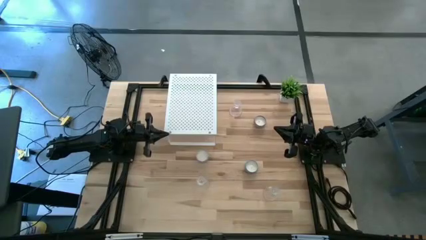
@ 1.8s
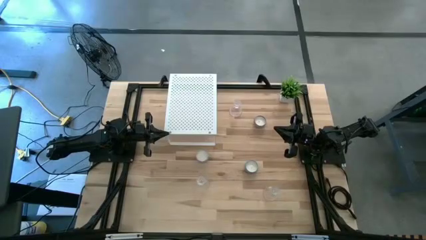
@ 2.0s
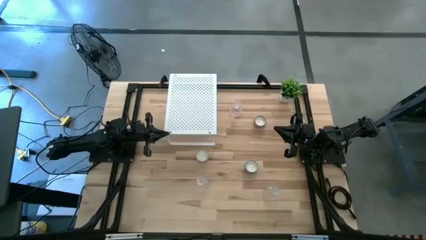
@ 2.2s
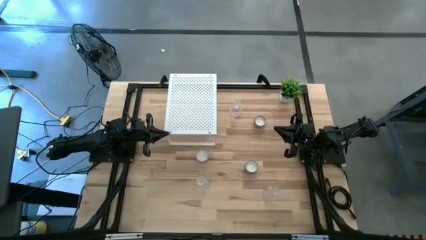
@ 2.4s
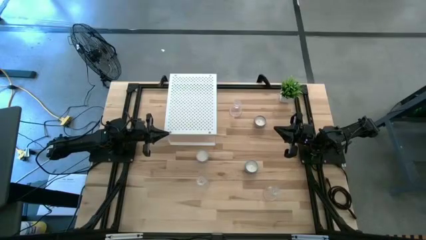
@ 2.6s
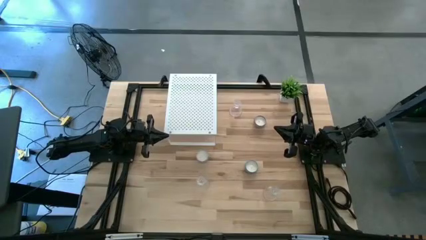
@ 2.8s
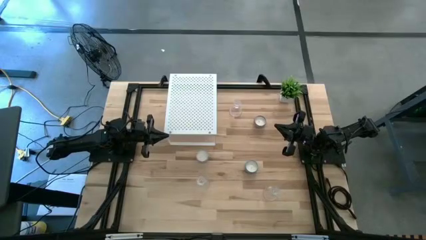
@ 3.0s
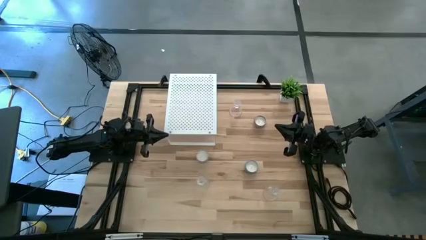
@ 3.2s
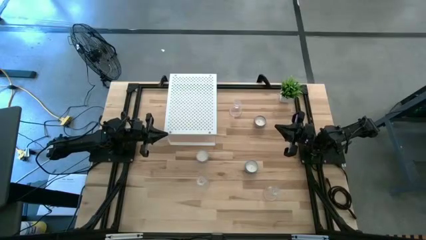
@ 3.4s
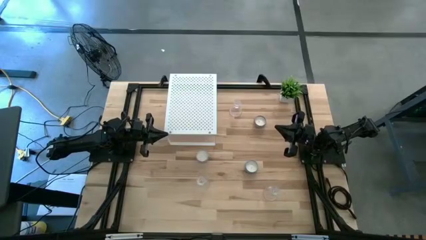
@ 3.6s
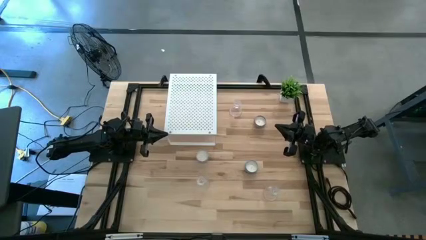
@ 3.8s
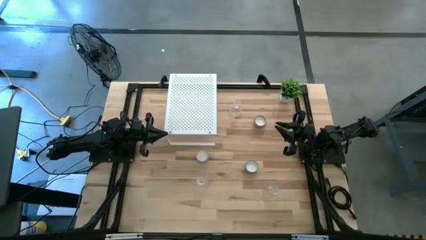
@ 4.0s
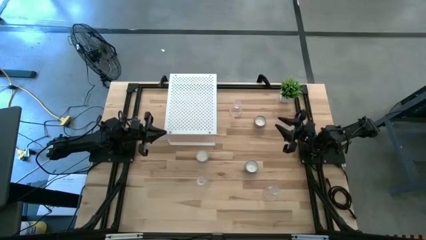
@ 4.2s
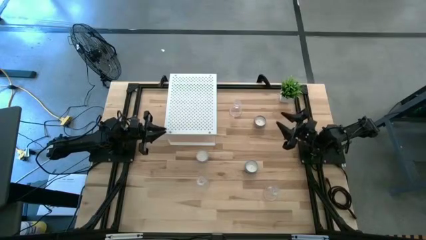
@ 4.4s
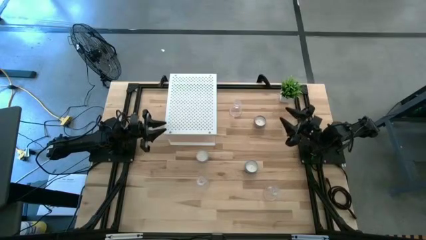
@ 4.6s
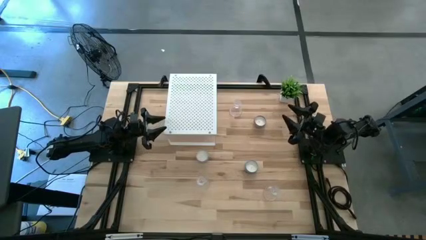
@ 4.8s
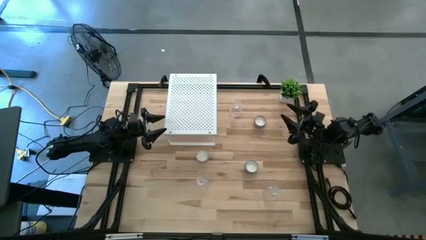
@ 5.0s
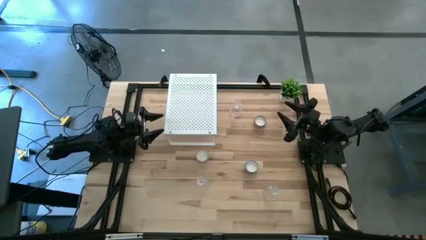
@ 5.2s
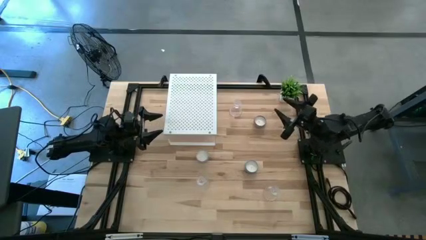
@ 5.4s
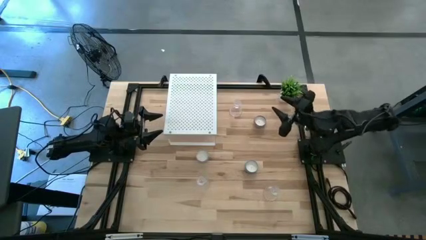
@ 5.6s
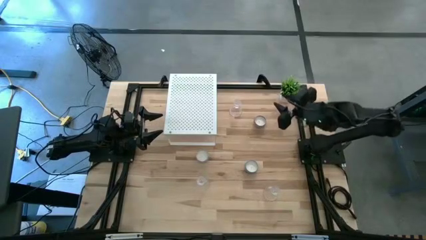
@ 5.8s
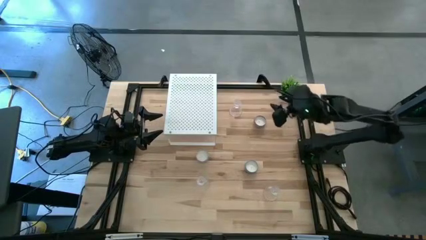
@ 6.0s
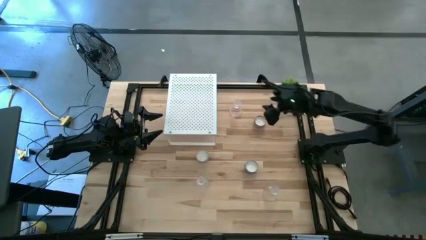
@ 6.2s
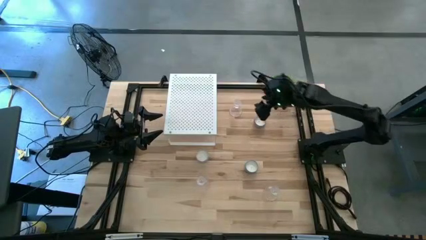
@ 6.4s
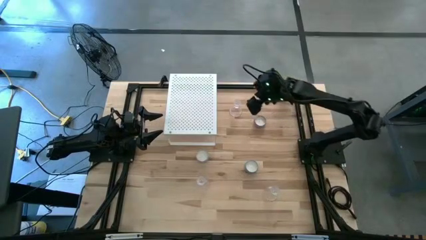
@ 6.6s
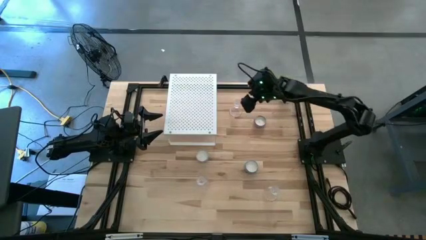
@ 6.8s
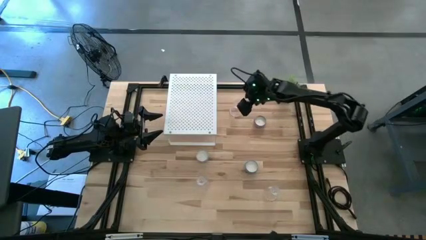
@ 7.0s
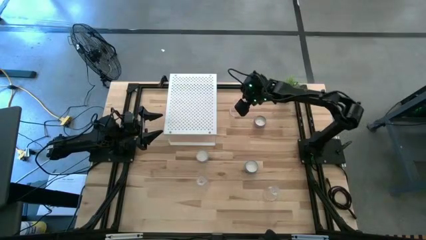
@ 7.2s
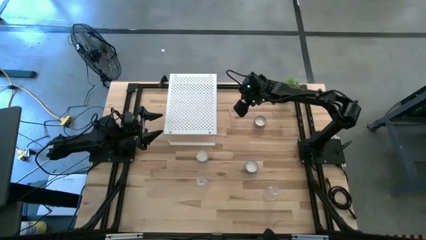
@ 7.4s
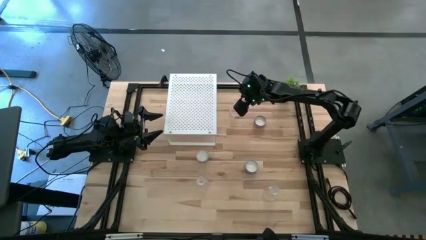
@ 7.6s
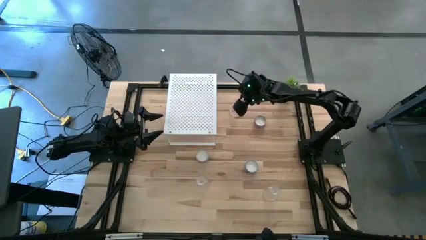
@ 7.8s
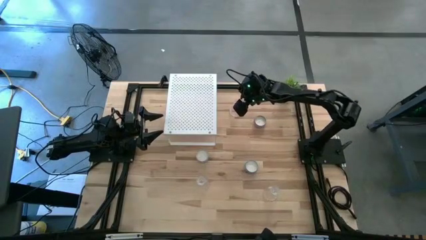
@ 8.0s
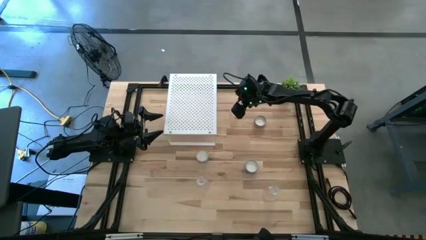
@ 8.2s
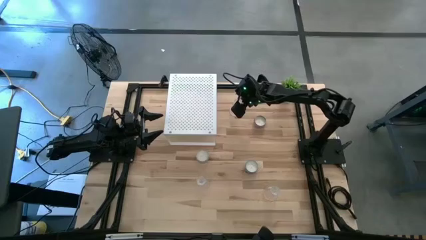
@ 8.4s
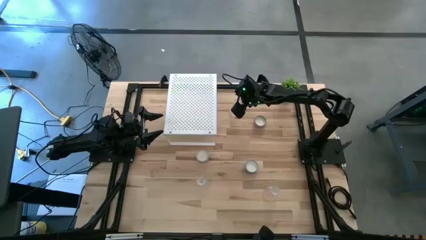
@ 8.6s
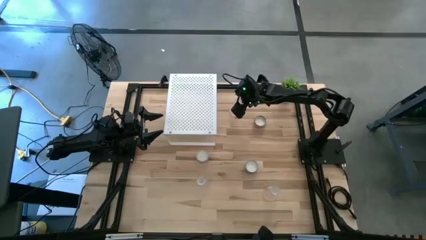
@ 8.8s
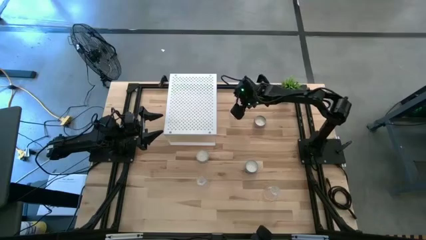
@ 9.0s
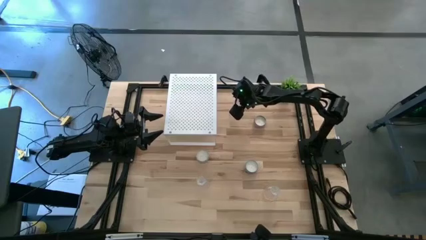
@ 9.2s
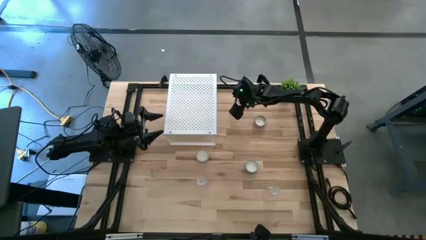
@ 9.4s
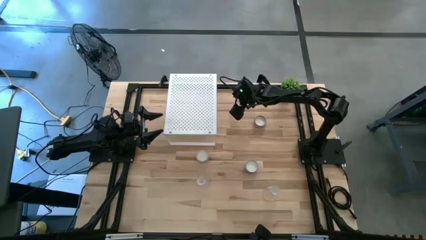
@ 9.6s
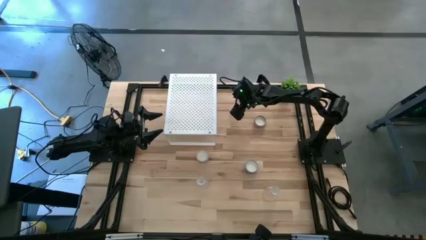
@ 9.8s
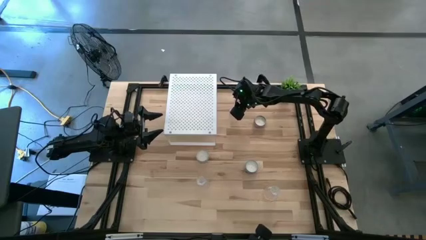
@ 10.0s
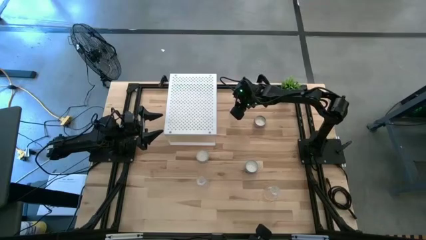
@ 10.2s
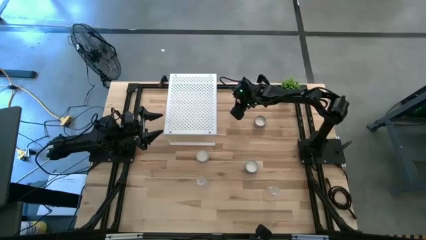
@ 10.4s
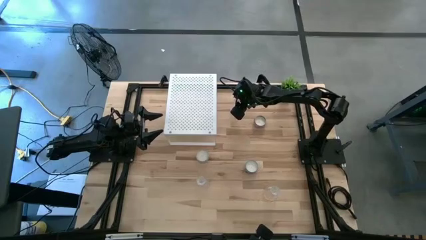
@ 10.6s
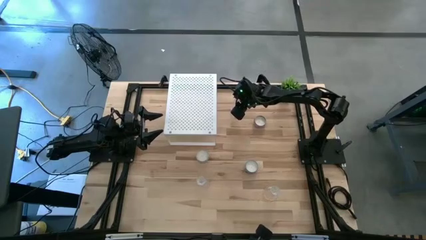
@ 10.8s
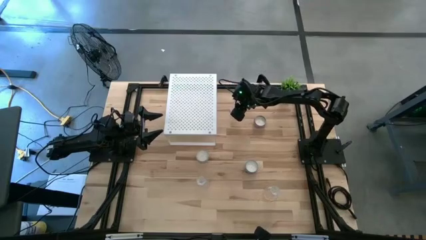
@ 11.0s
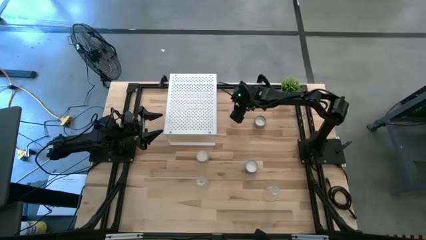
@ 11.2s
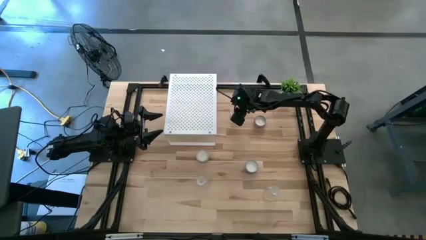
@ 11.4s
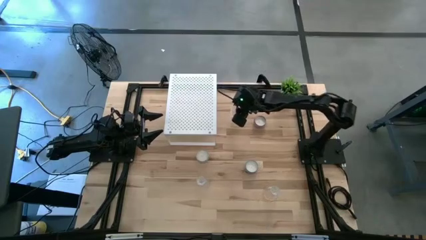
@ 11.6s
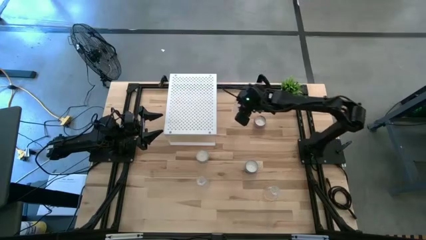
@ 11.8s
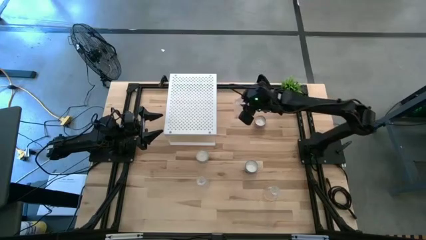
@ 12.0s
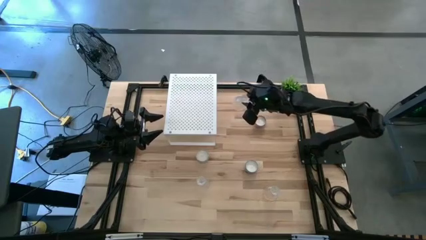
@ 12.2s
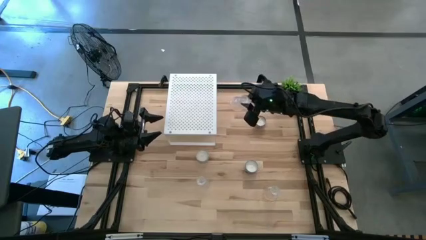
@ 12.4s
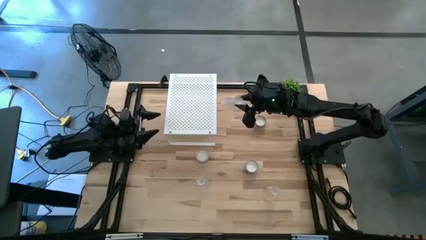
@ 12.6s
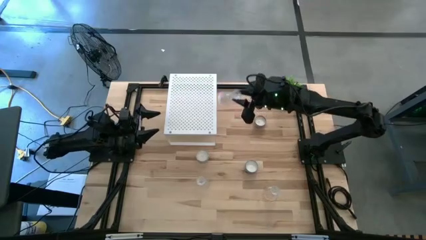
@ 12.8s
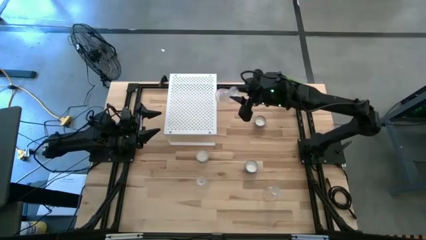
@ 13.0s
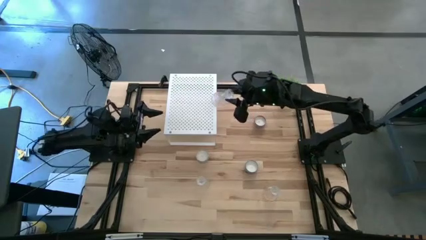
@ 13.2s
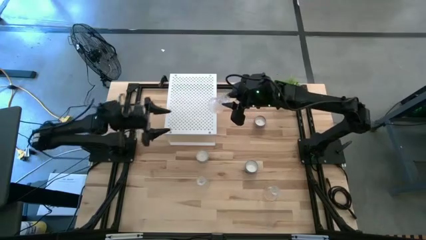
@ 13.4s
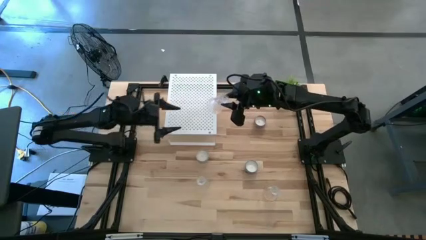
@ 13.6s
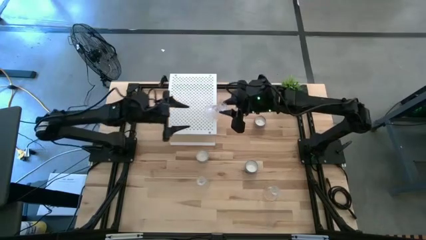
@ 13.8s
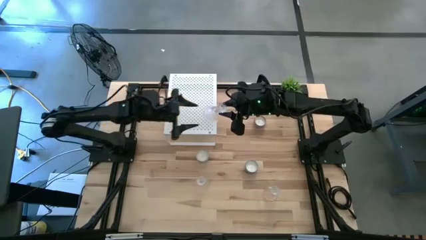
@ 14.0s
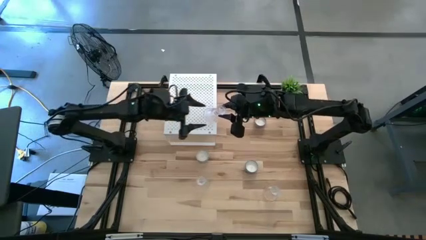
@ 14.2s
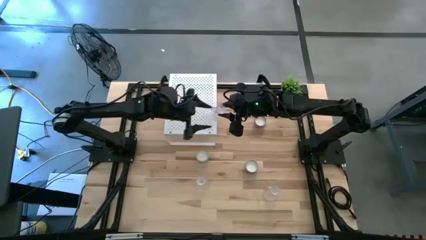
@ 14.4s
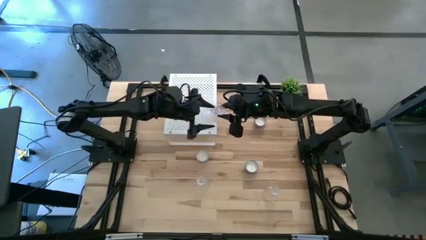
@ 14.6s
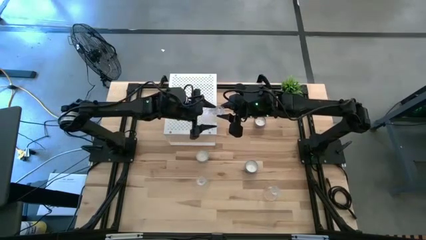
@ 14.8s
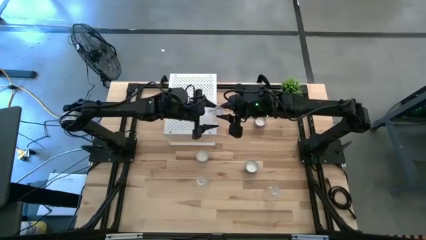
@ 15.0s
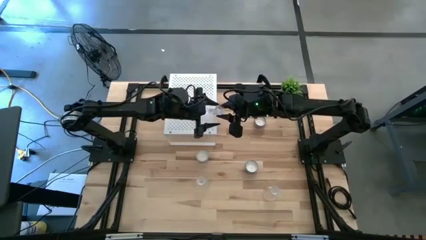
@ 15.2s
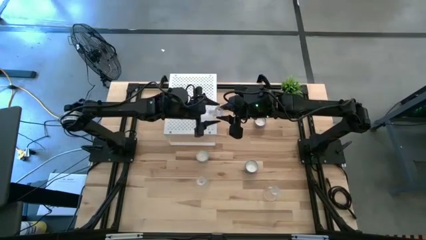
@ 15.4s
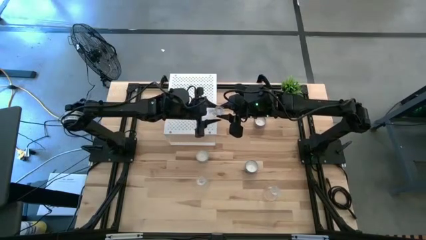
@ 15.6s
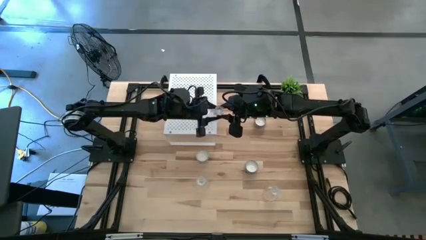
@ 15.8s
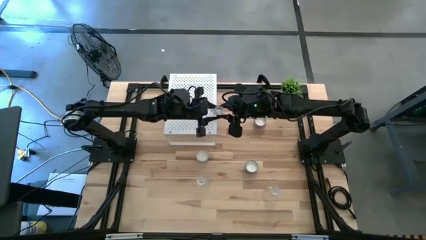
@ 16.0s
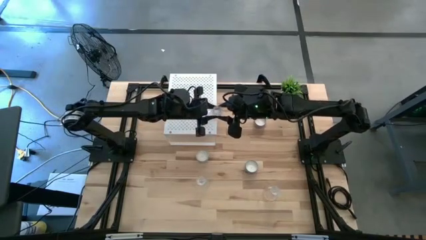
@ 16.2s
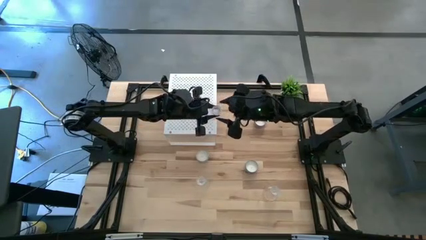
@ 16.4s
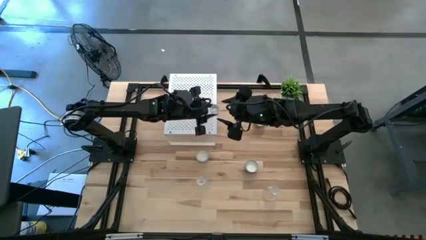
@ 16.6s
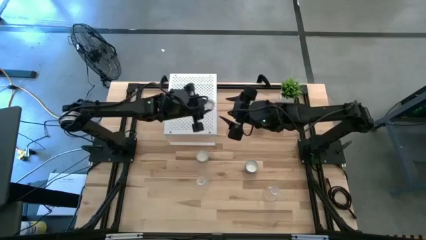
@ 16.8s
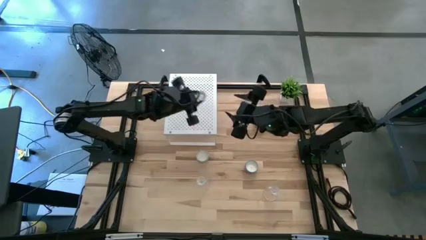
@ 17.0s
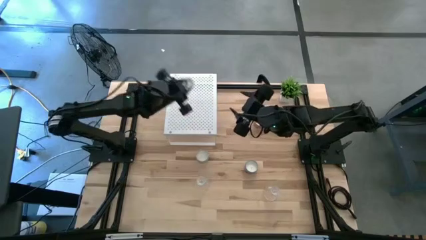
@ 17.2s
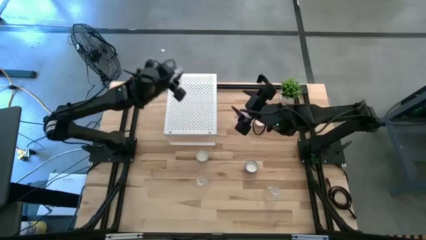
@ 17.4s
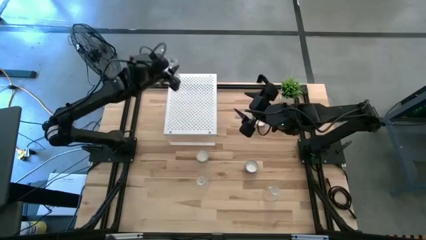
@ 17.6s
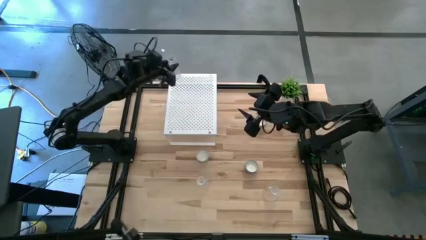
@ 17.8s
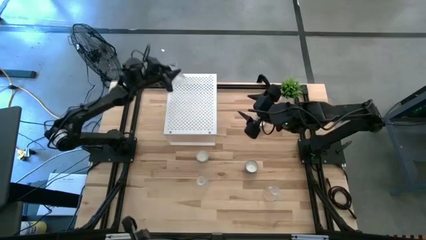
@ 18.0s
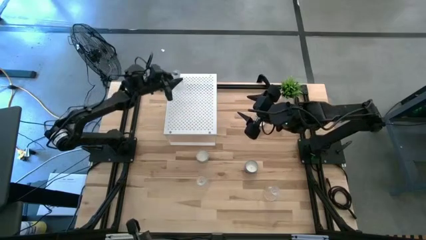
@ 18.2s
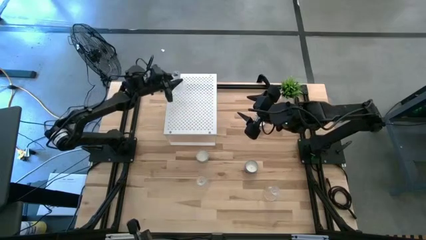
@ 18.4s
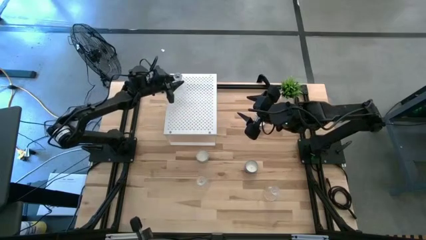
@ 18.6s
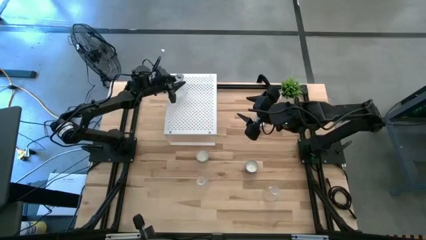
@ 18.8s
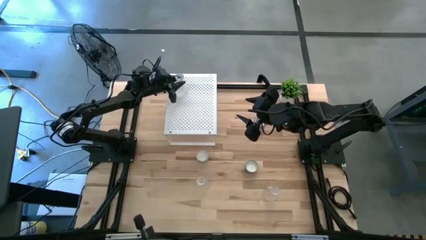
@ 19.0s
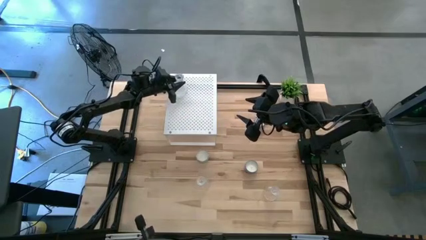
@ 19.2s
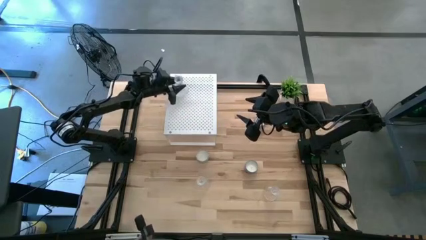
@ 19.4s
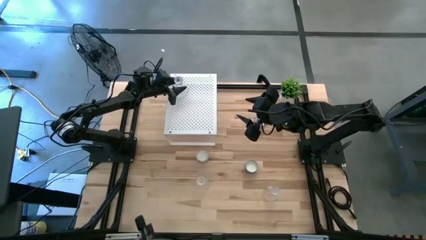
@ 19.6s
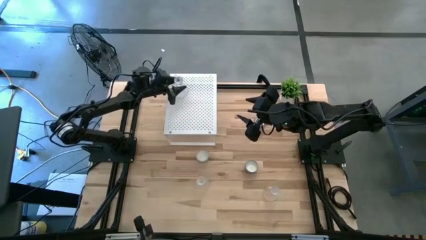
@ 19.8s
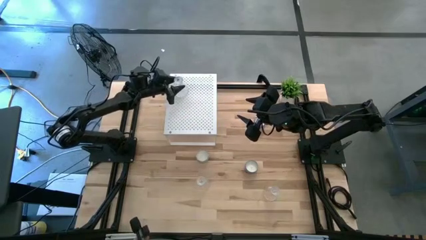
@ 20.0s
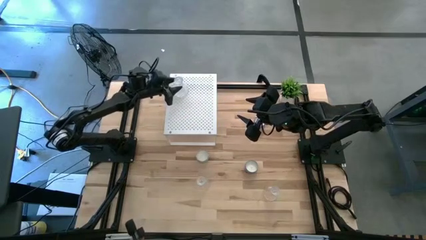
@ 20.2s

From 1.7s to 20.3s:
Task: Pick & Place candle stick holders
Put the top transparent candle holder on the shelf
